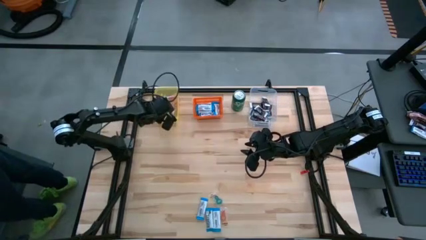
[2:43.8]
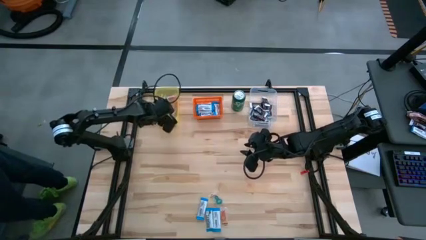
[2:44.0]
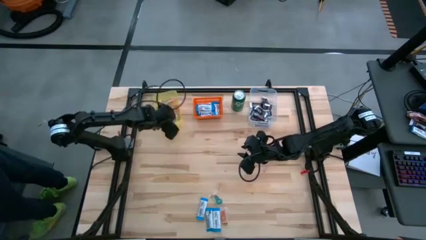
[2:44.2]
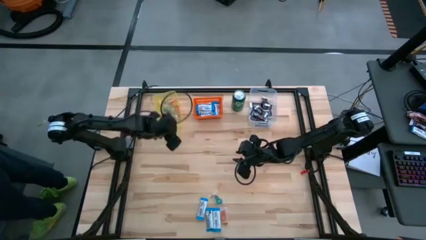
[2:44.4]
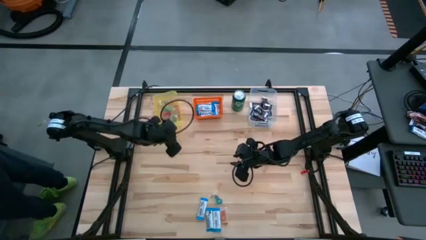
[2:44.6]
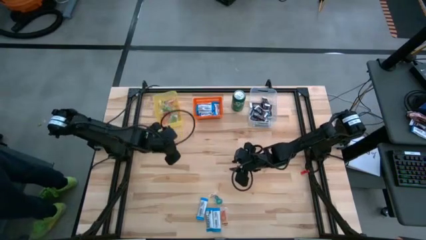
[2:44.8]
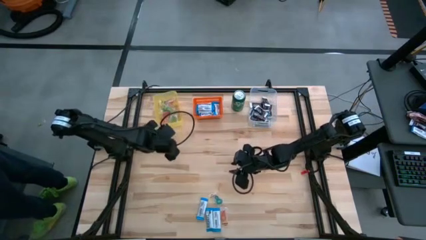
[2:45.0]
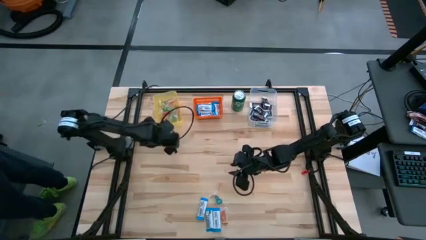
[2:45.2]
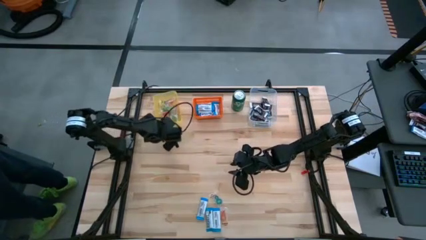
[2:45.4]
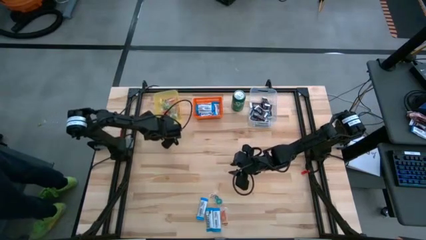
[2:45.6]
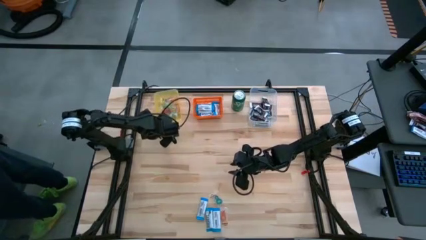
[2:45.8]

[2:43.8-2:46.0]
Task: Organize candy in baskets
Adjust the yellow bin

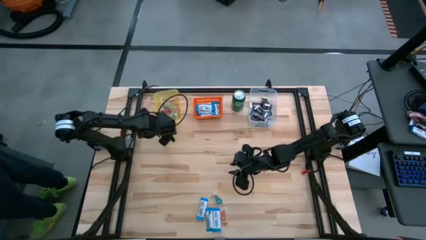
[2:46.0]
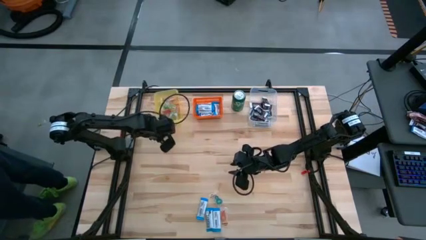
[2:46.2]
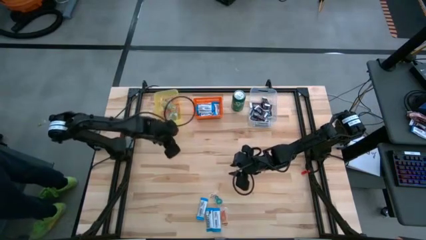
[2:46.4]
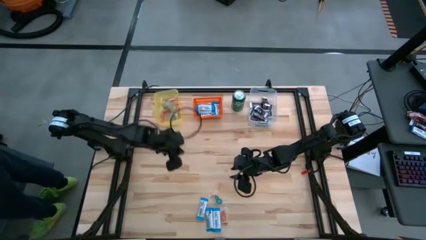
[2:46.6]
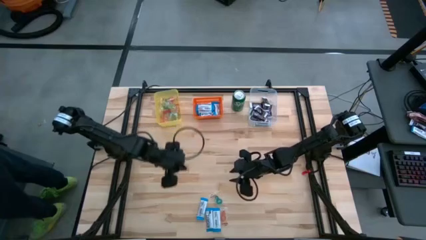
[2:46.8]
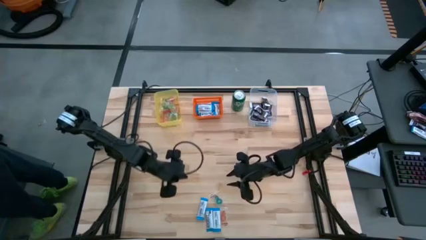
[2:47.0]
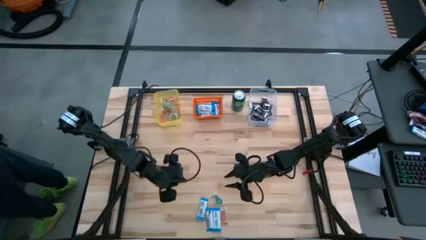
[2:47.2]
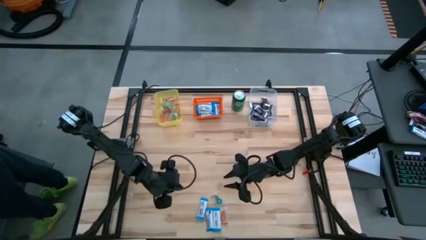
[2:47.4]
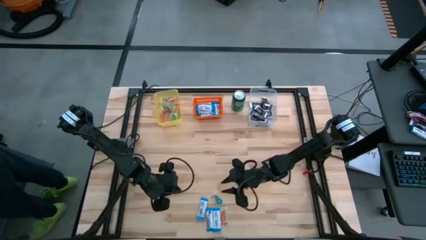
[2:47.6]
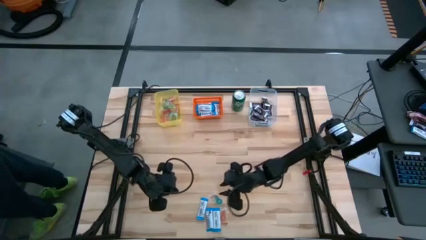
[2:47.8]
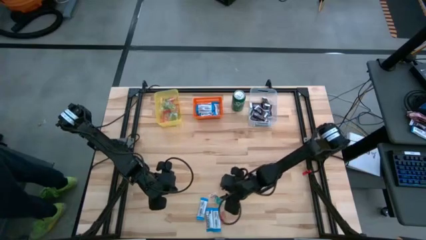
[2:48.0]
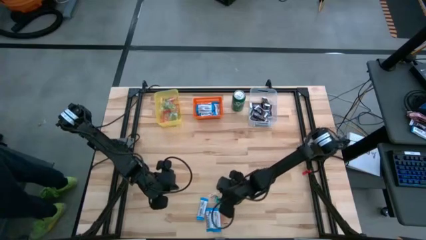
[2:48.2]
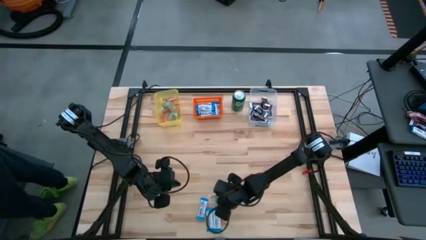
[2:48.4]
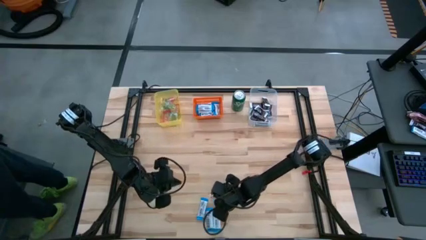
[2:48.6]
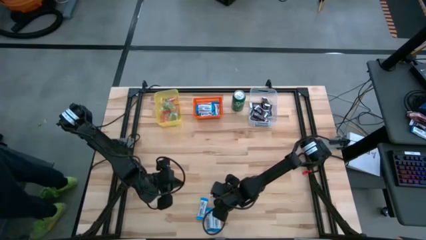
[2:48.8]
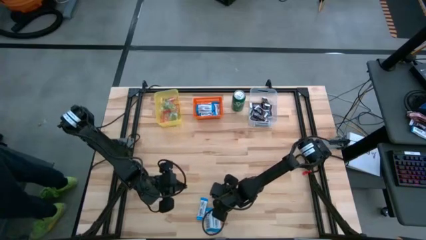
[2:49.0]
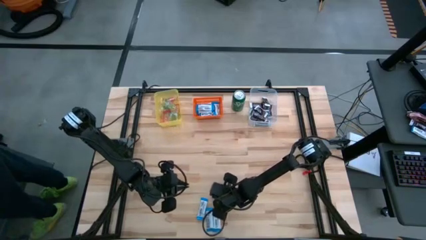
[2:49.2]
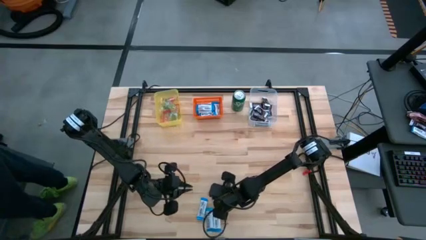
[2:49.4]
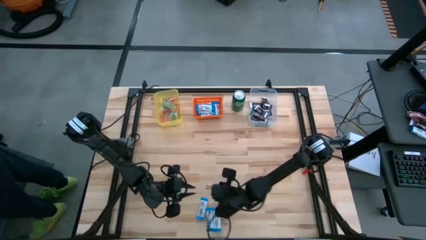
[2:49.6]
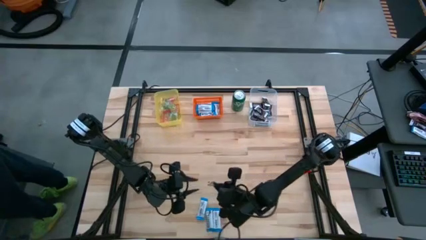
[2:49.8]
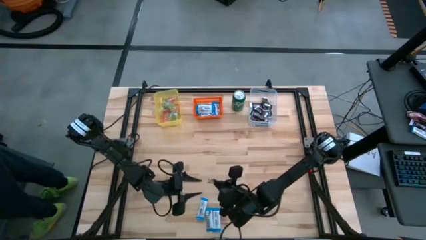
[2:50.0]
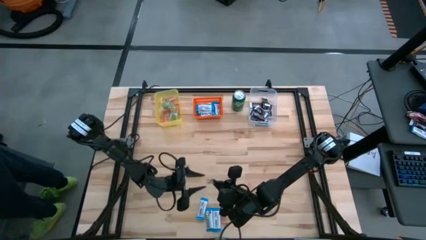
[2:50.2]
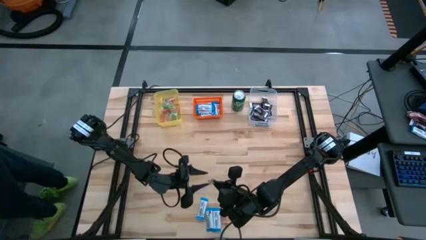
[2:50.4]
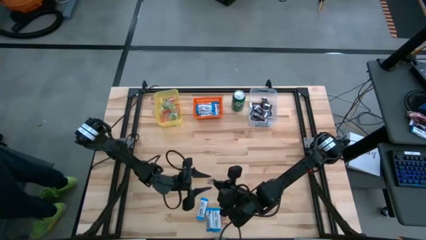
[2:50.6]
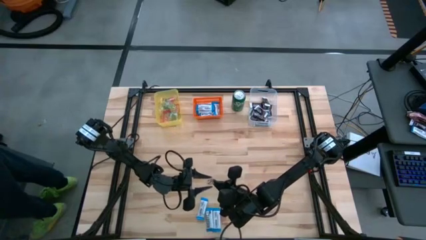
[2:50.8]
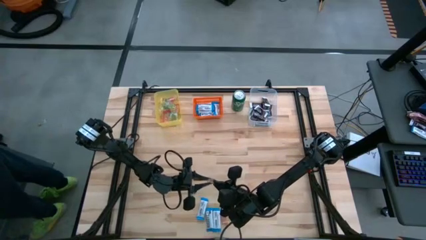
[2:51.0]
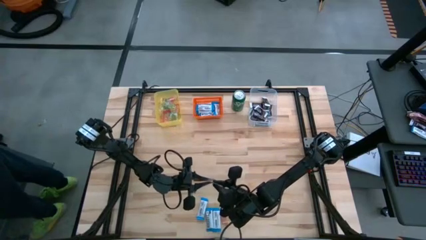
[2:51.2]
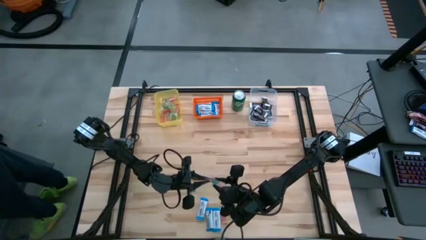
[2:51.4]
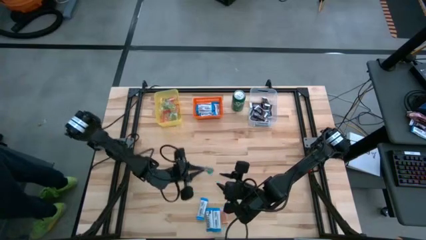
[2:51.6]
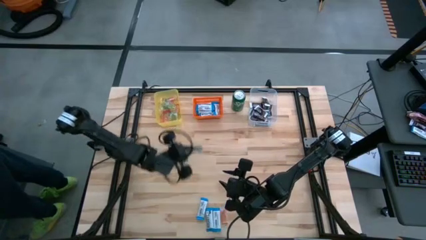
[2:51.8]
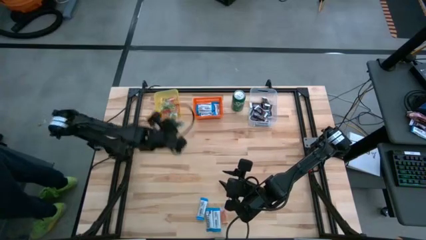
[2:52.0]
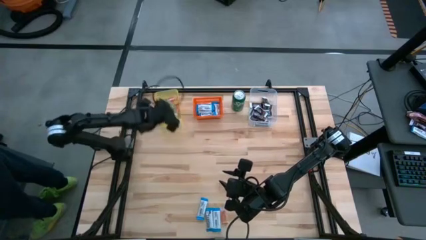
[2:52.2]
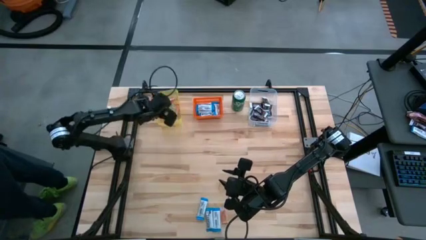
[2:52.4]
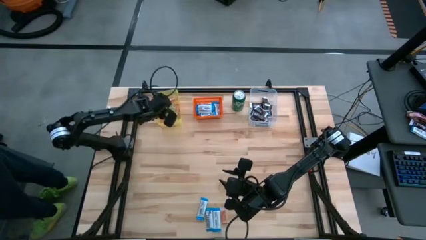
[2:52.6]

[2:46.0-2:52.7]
Put the blue gummy into the yellow bin

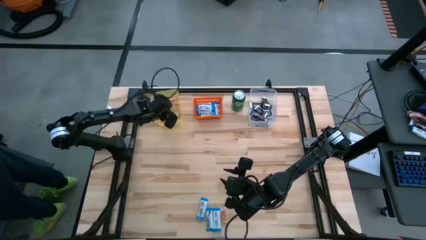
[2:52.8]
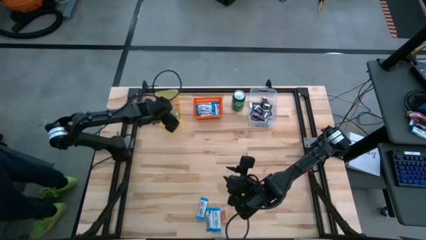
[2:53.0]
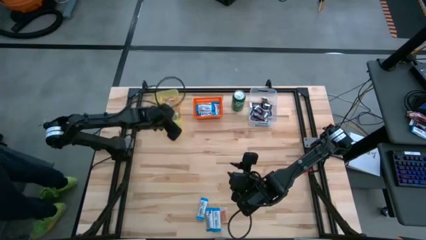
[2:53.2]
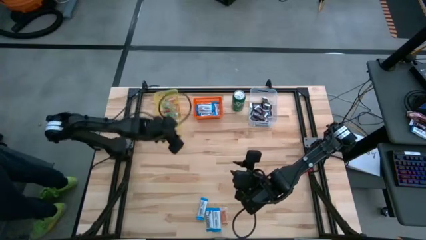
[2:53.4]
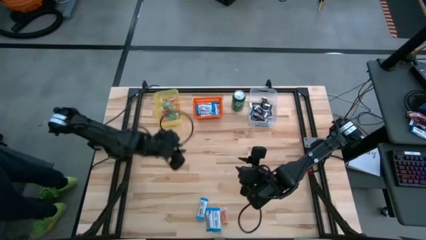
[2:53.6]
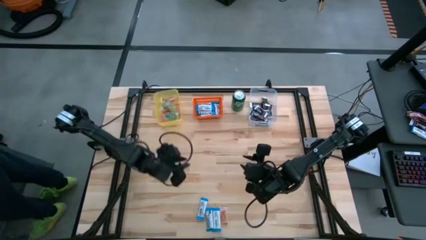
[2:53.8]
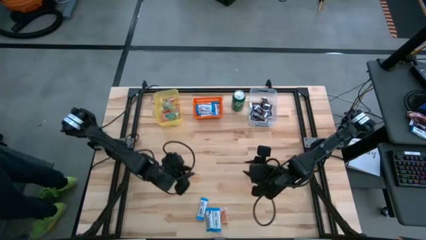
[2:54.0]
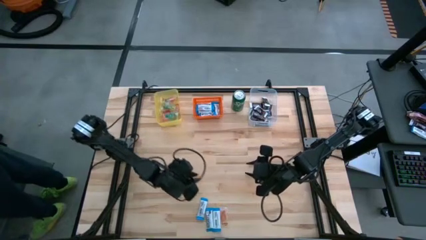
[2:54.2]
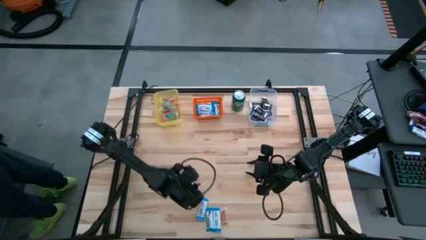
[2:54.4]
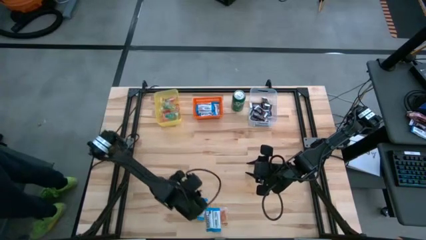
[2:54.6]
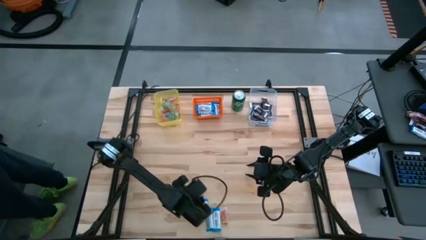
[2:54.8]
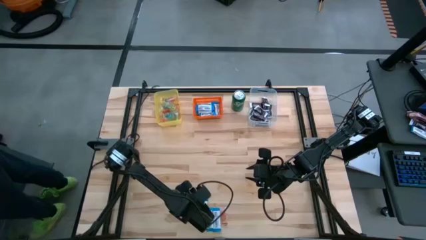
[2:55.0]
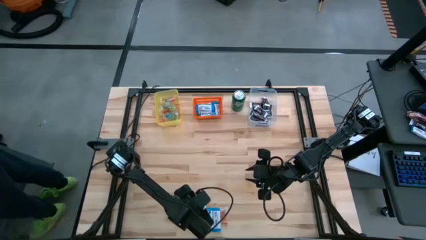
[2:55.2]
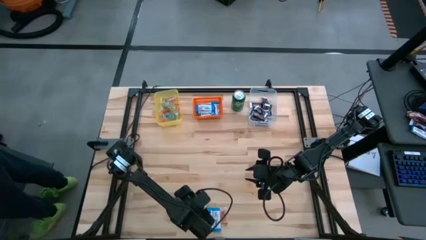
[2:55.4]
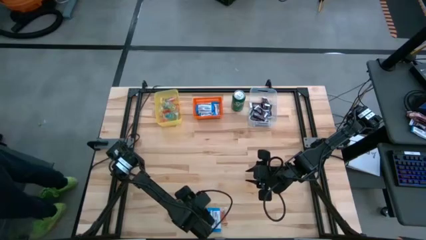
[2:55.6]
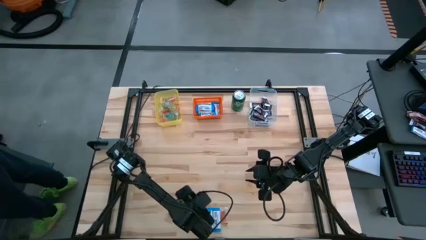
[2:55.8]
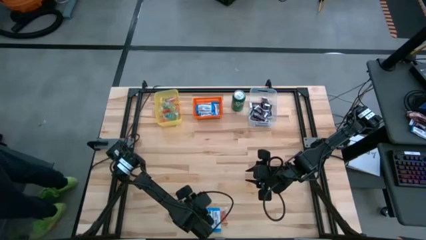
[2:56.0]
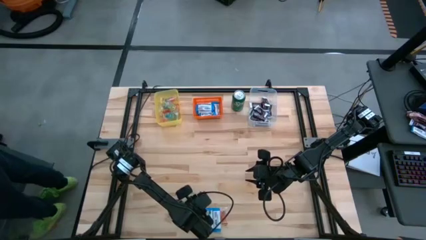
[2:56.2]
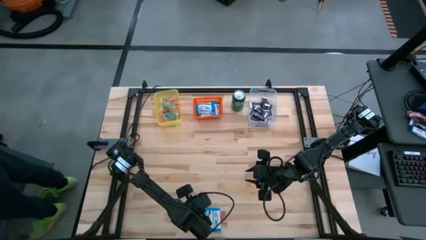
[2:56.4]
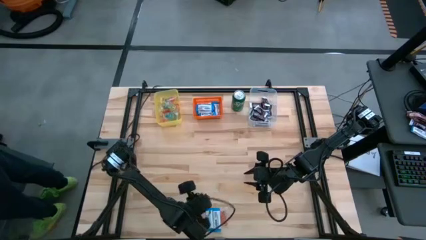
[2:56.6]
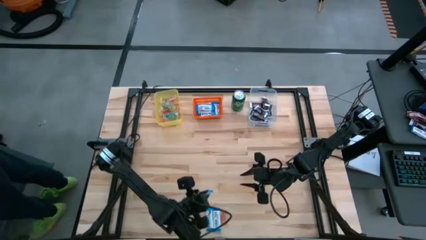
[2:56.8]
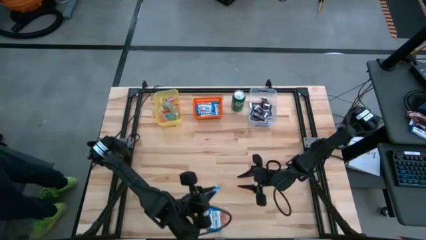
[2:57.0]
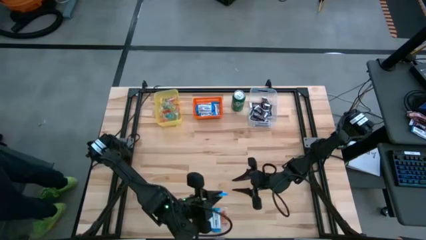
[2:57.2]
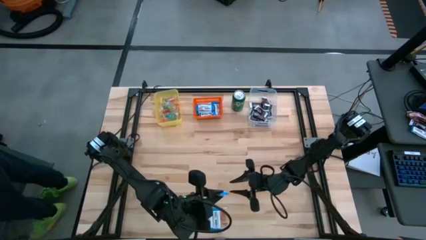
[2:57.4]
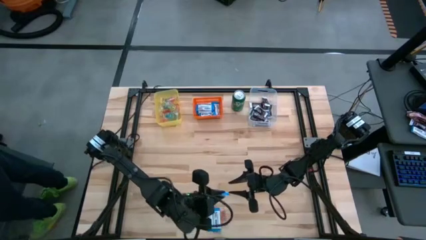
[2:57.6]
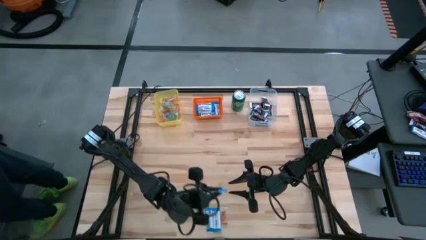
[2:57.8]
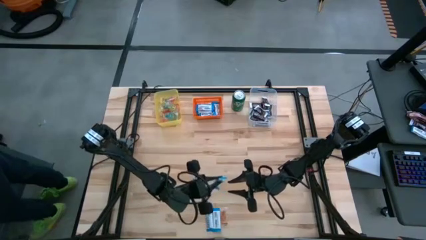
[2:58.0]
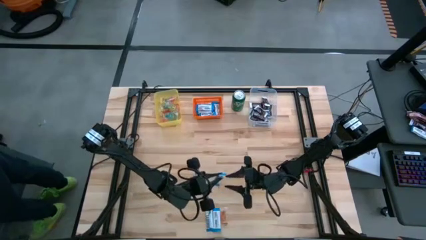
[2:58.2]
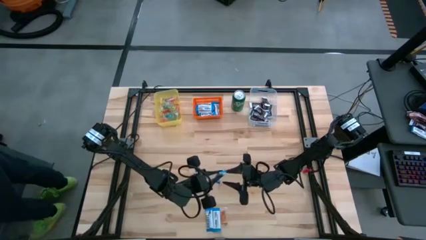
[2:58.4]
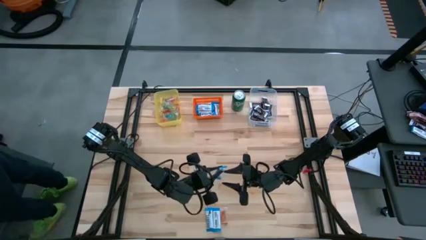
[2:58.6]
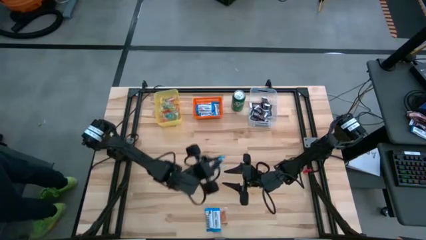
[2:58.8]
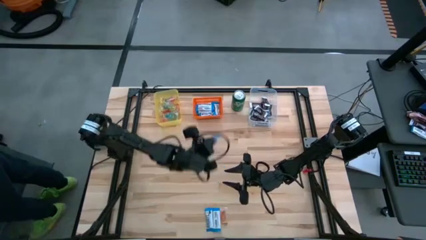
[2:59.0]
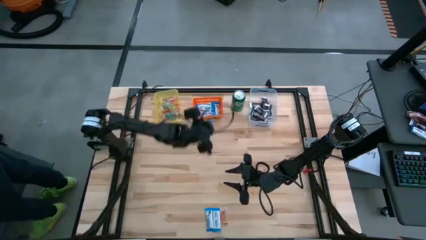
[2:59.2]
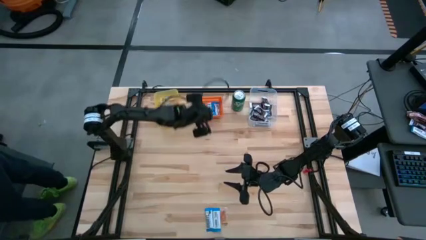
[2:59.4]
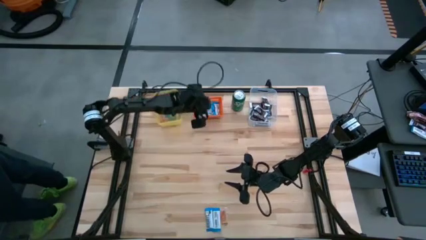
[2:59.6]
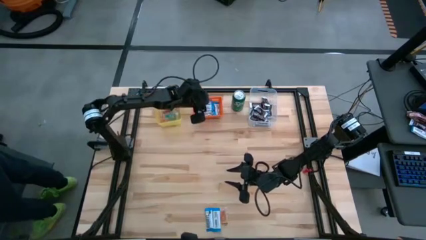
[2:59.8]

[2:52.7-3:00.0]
Put the white chocolate into the orange bin
